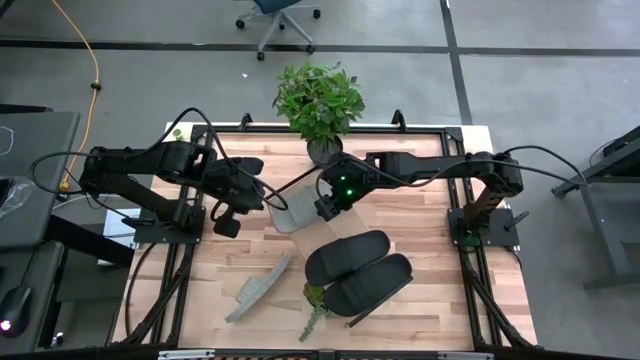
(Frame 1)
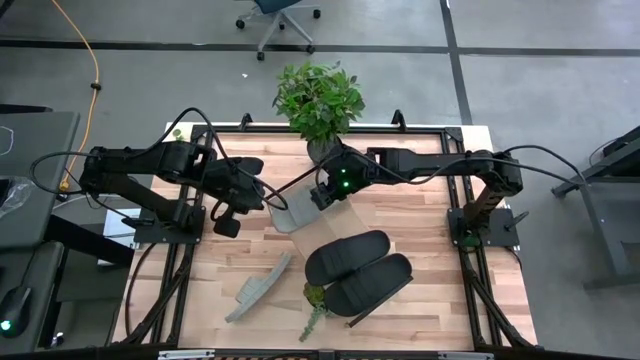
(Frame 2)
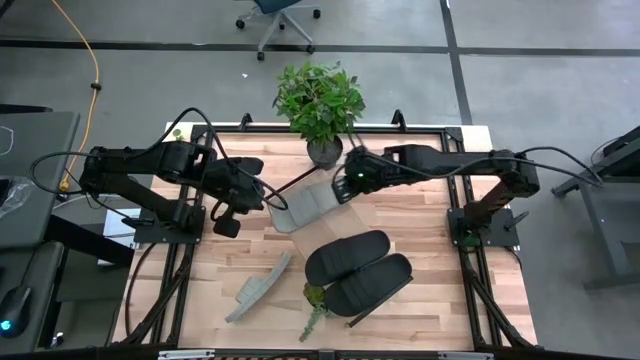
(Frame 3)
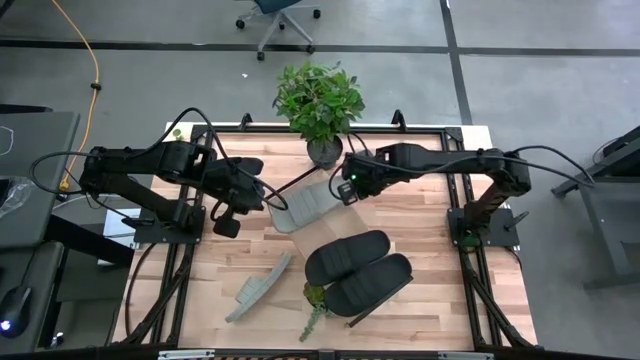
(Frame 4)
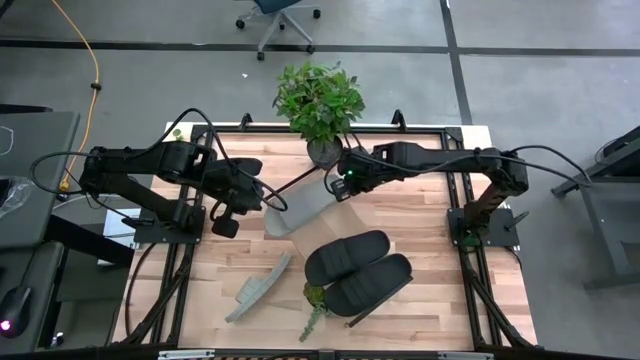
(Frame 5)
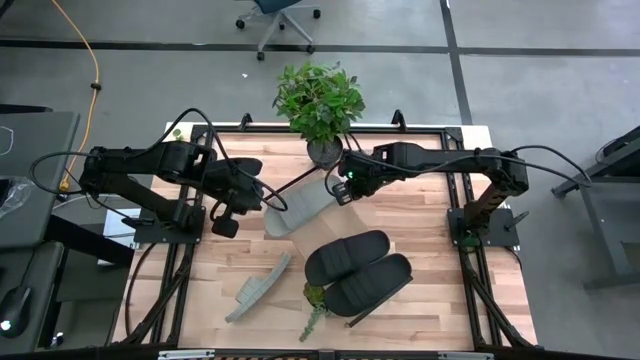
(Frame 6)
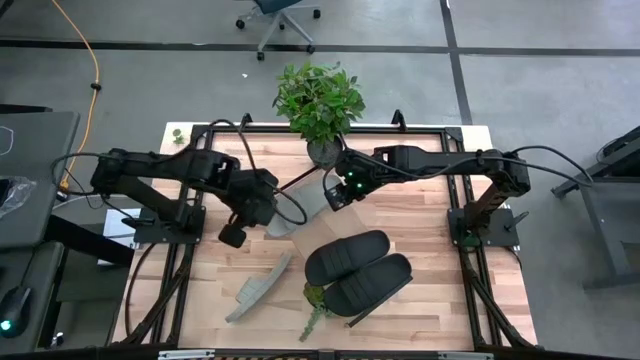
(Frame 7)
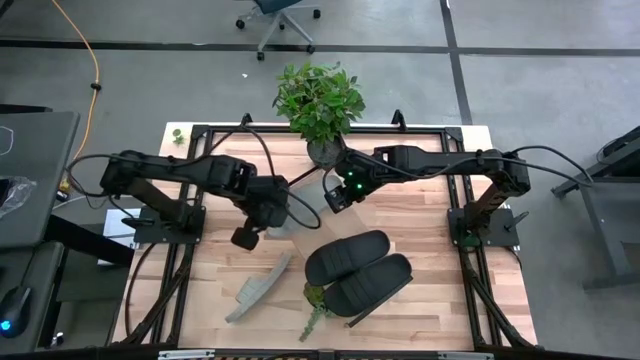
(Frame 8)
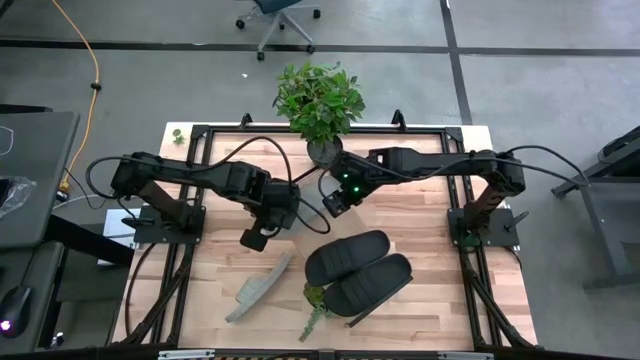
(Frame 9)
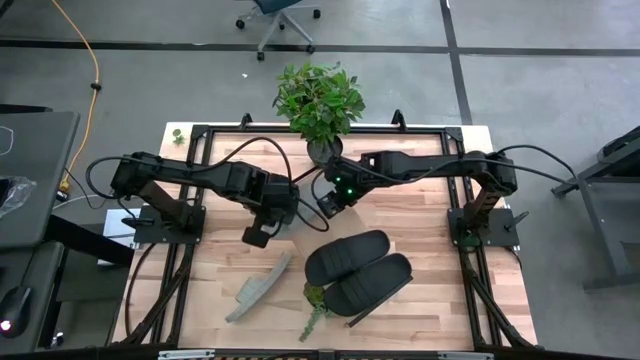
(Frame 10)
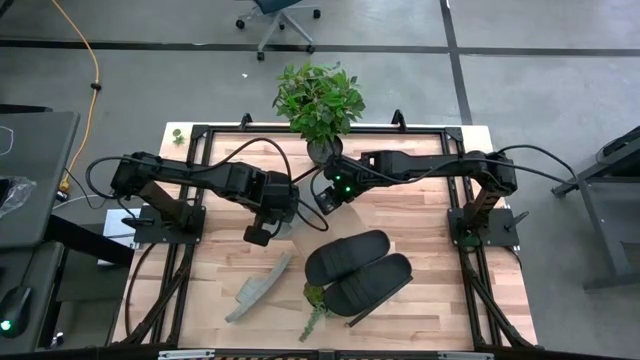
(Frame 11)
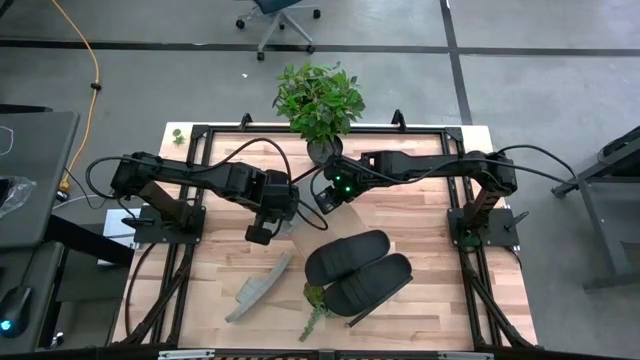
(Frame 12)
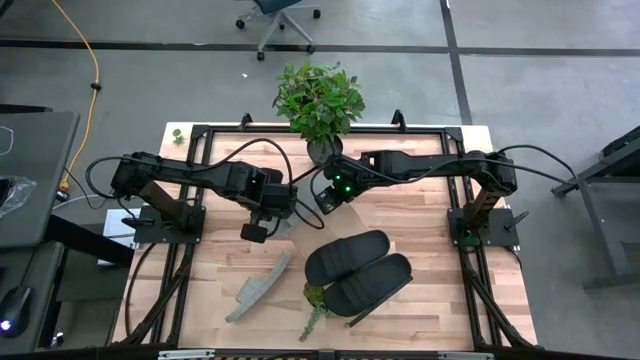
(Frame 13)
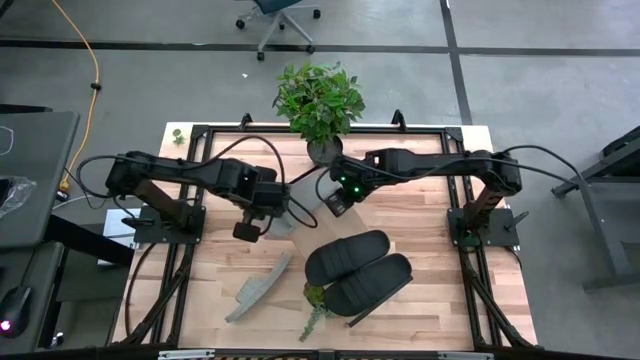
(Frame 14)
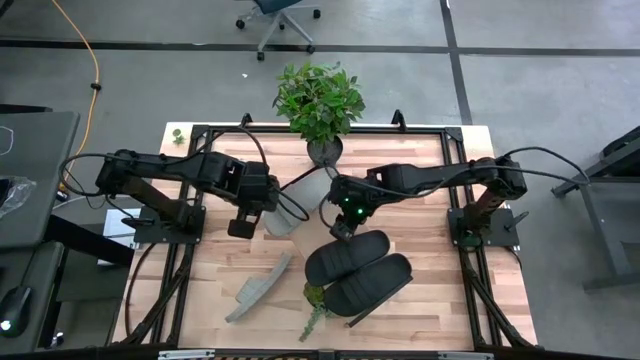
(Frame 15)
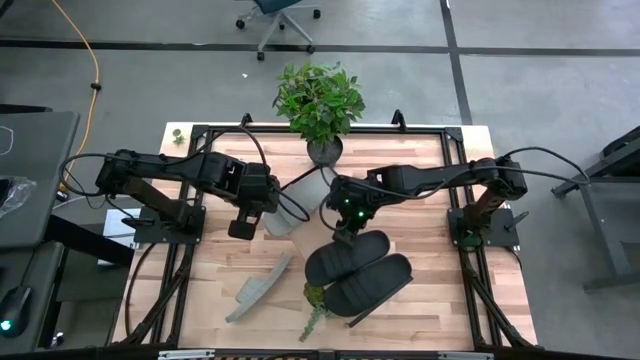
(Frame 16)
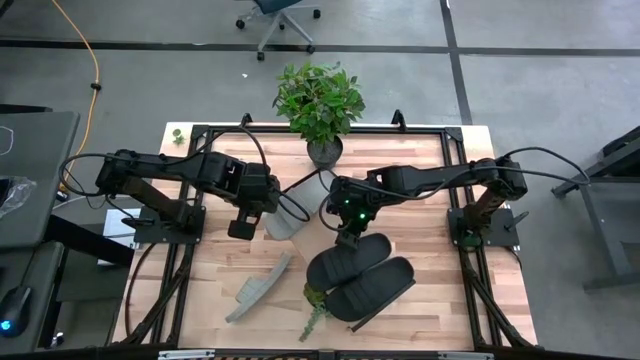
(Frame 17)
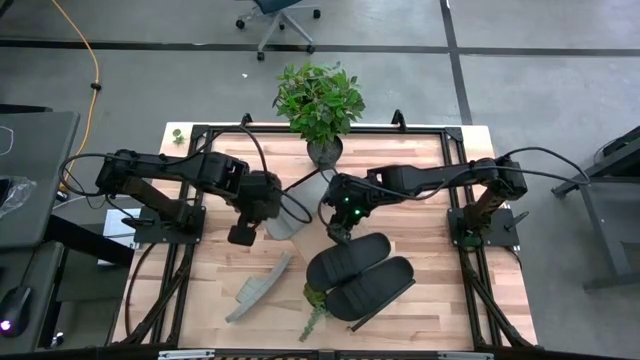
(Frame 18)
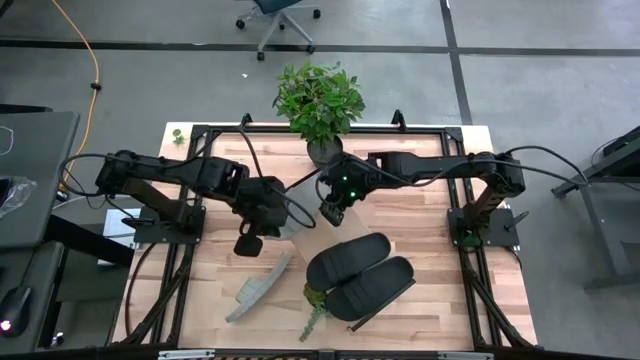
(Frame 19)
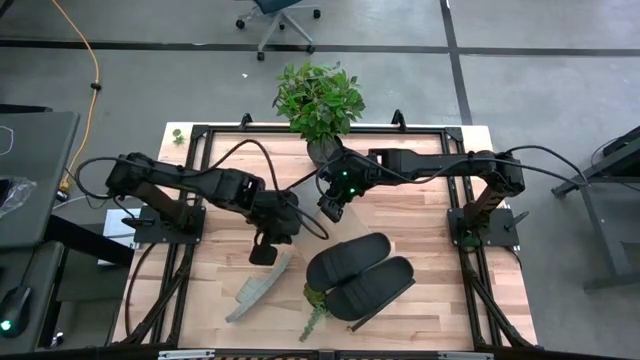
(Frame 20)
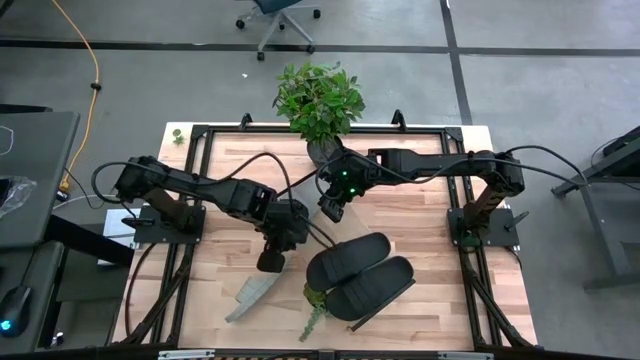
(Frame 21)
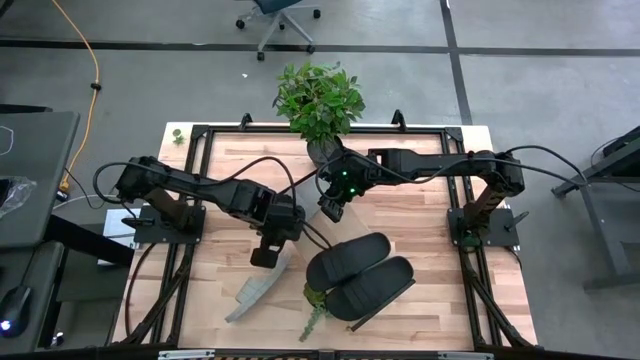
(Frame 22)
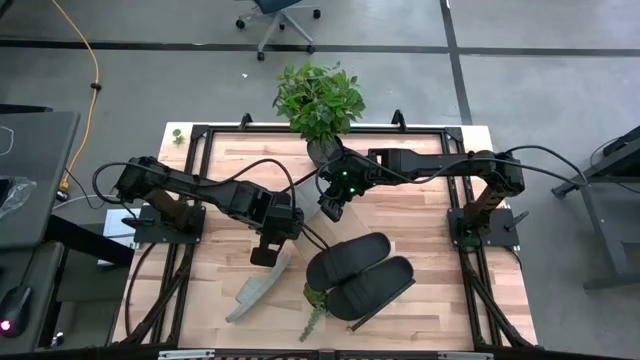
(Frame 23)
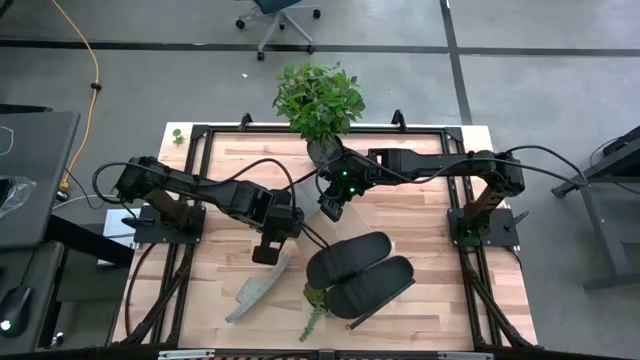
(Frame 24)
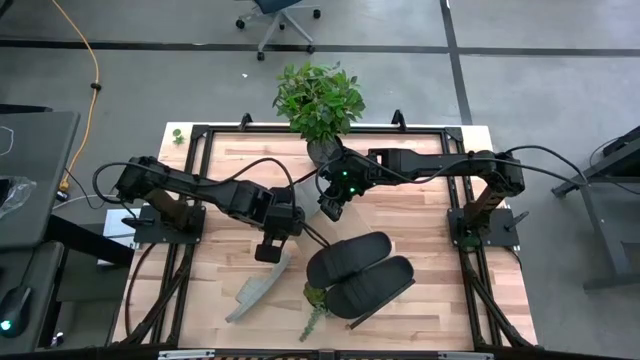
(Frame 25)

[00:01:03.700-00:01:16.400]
Task: Pick and place slides into the shelf
Put the right gray slide on the shelf

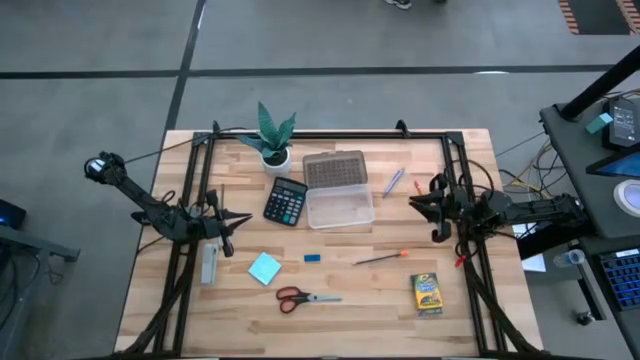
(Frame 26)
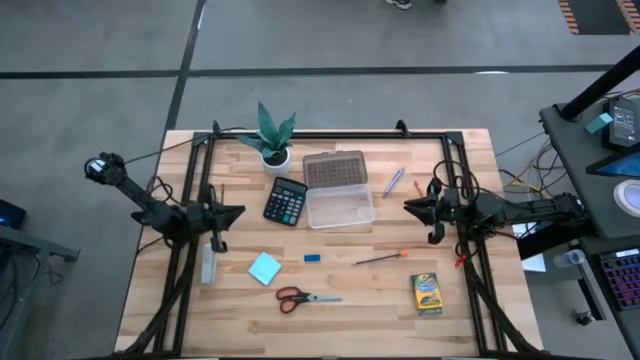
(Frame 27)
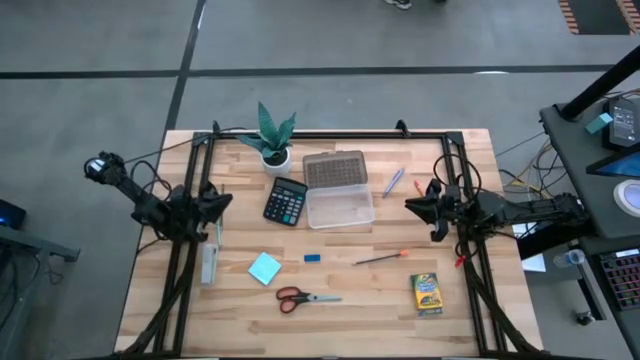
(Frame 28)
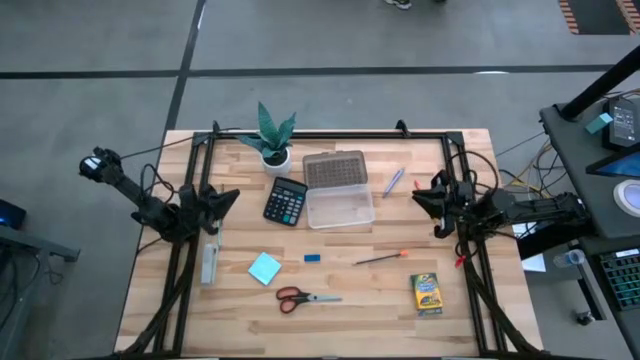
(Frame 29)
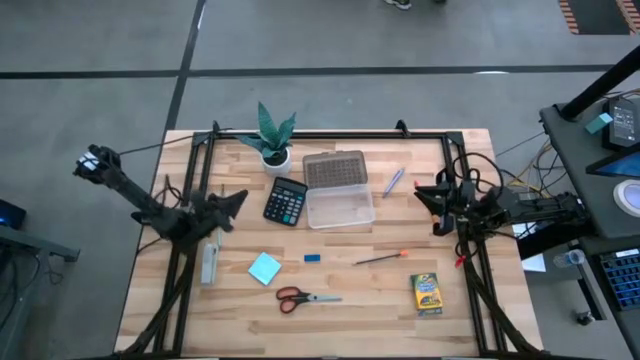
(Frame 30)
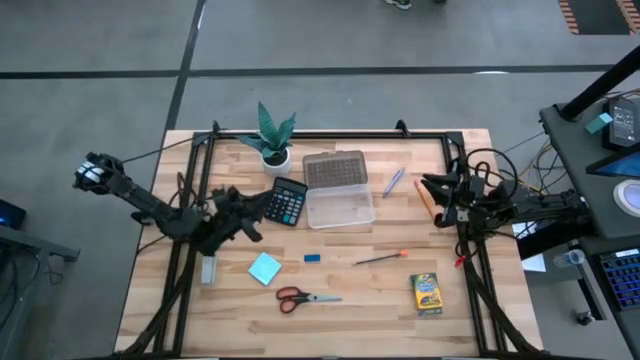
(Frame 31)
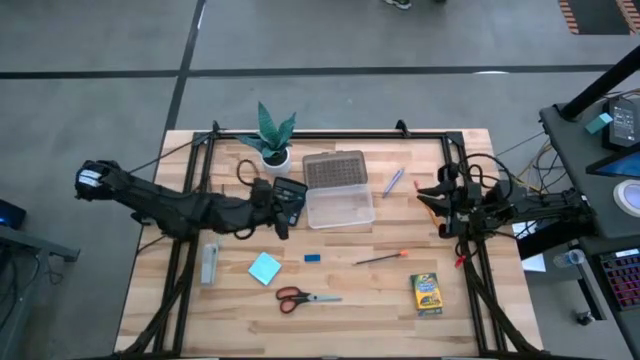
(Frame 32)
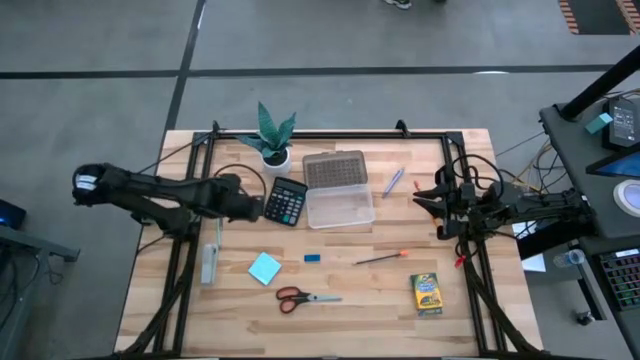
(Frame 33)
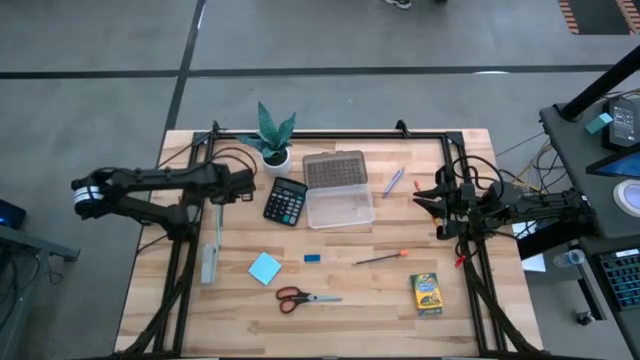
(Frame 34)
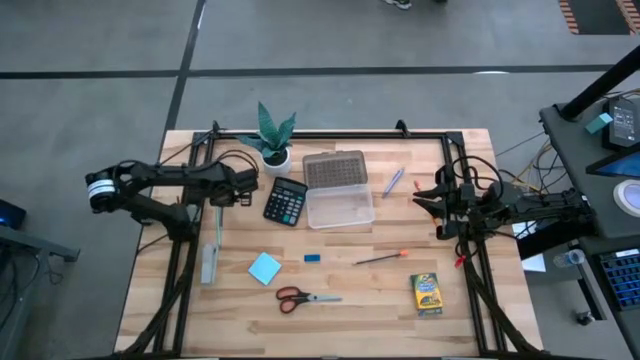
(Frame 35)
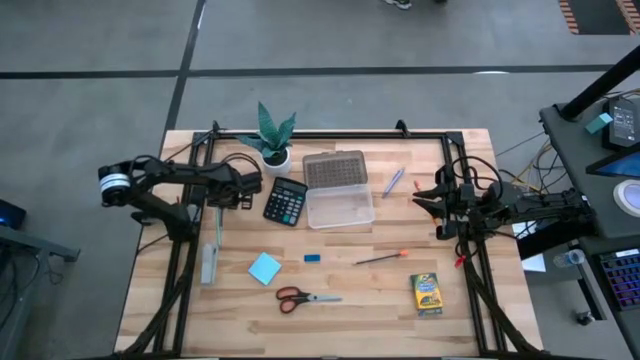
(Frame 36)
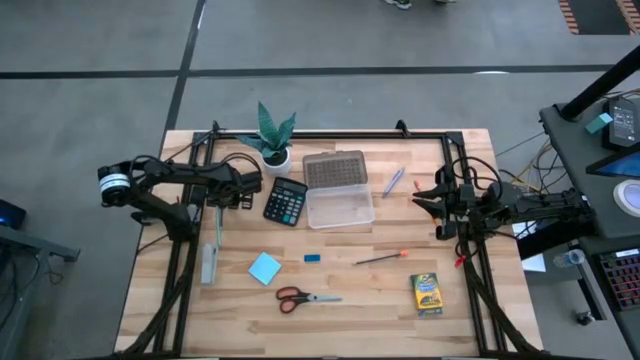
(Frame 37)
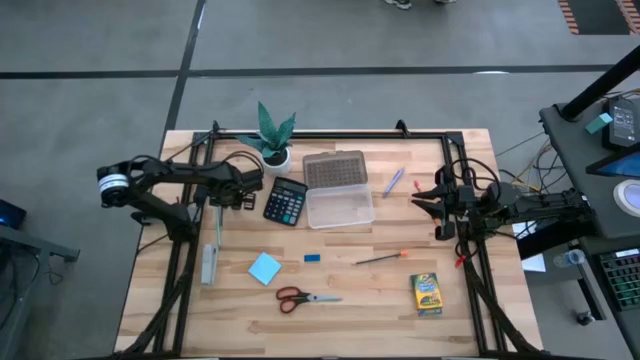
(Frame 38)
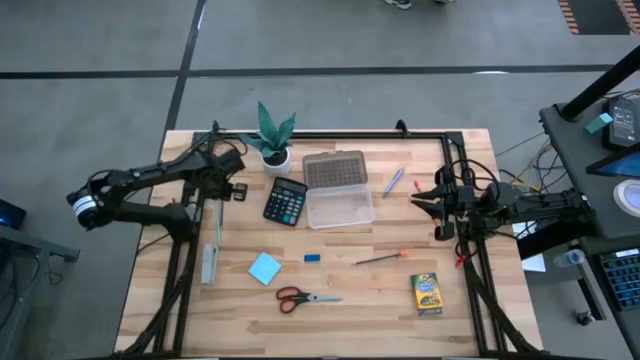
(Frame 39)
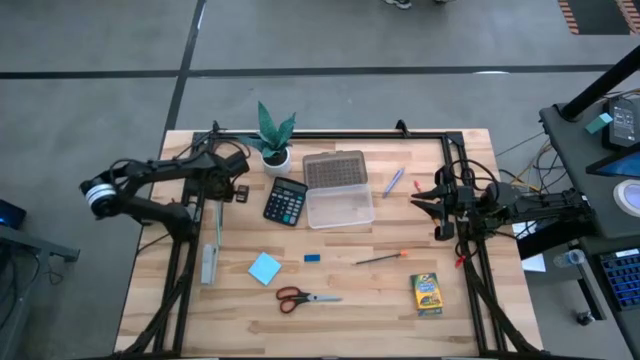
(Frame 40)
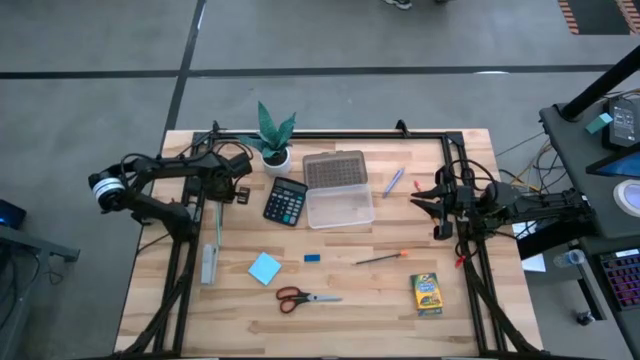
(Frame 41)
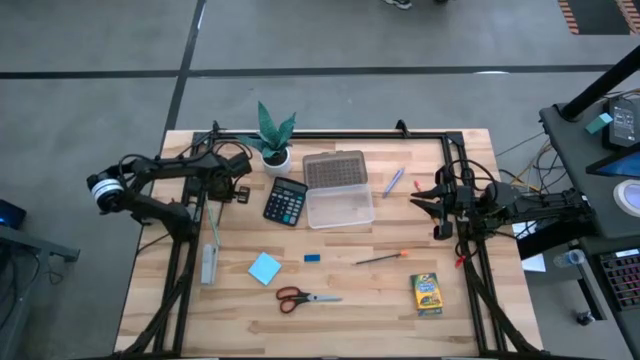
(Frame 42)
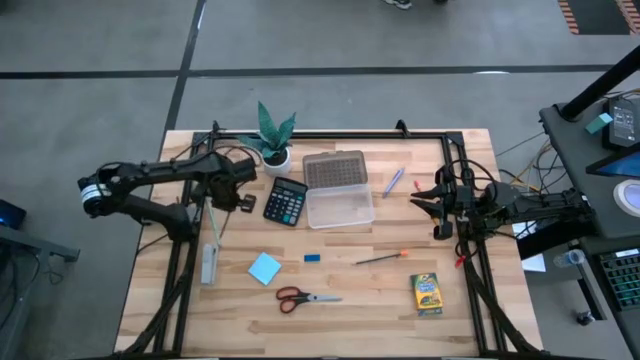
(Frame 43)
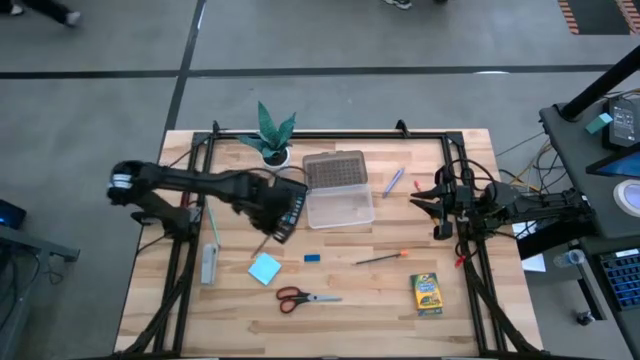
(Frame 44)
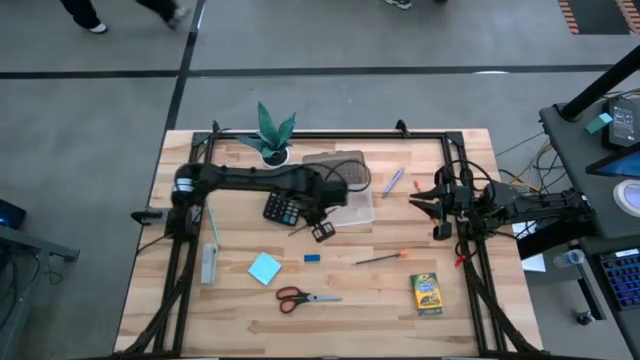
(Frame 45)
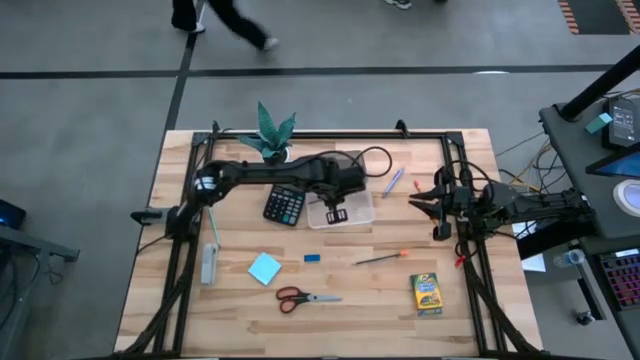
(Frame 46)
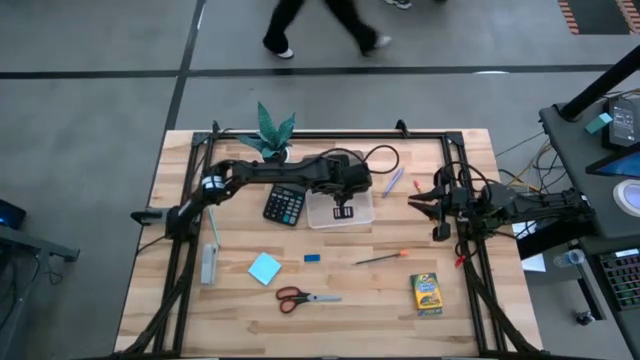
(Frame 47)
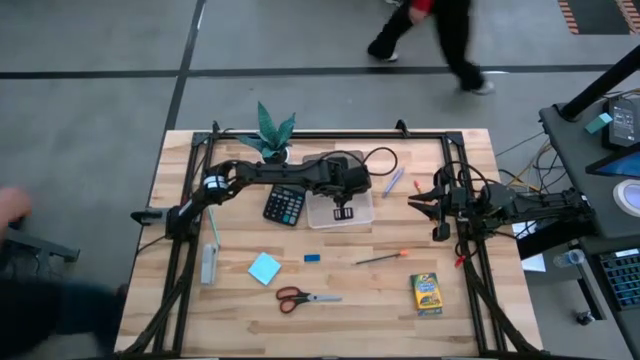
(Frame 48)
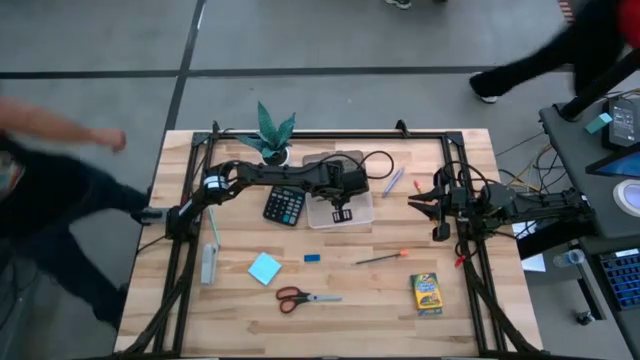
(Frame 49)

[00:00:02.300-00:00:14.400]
Task: Pack school essentials
Put the black pencil into the supplies box
